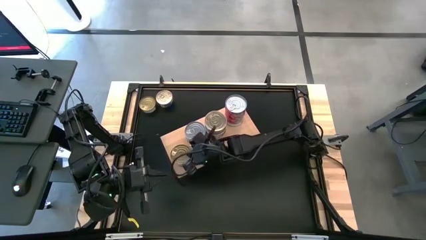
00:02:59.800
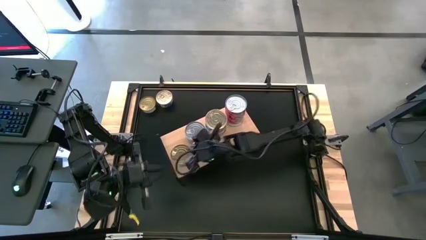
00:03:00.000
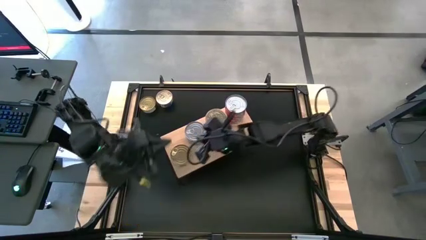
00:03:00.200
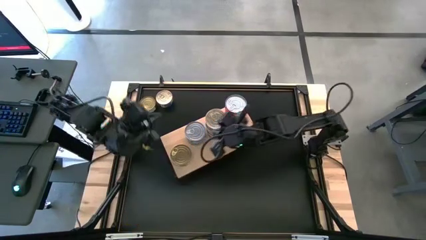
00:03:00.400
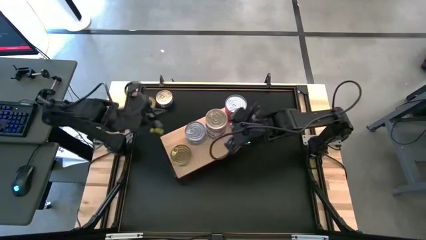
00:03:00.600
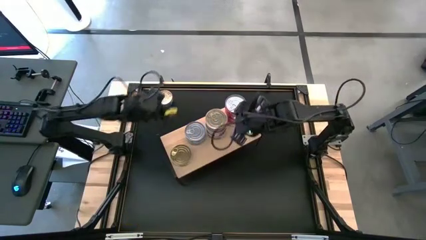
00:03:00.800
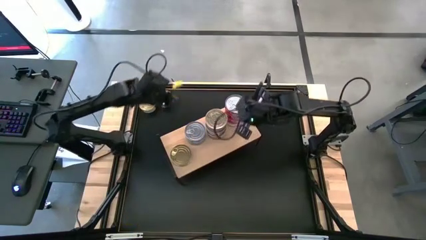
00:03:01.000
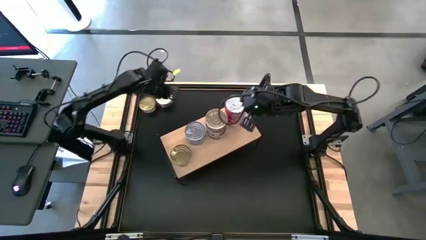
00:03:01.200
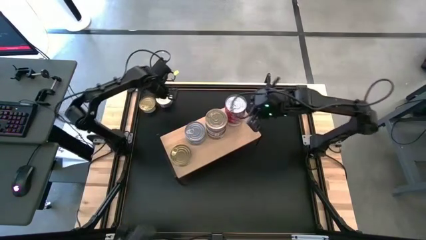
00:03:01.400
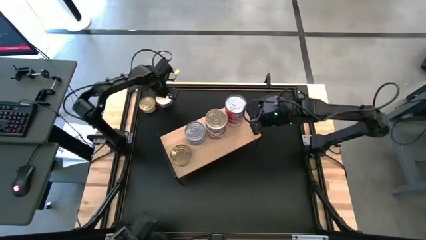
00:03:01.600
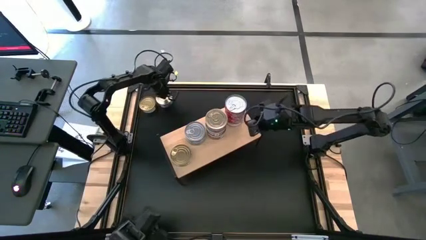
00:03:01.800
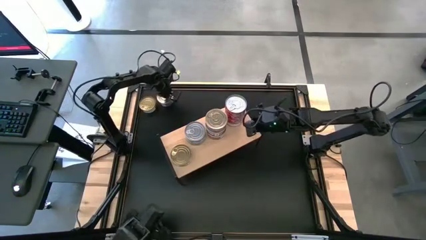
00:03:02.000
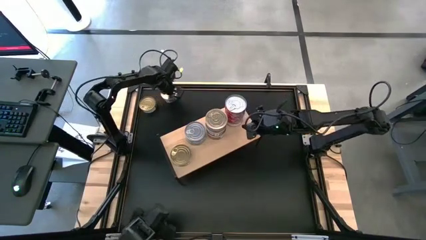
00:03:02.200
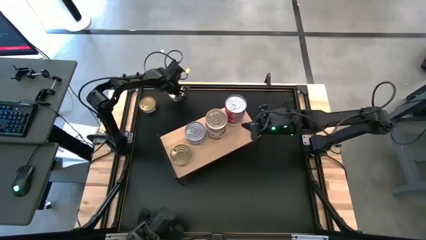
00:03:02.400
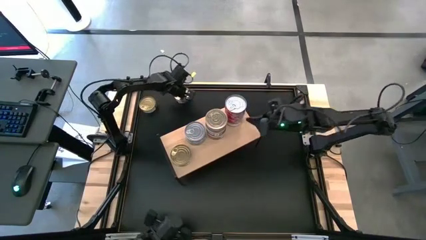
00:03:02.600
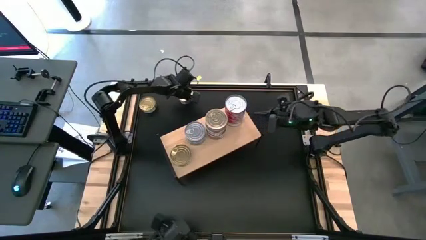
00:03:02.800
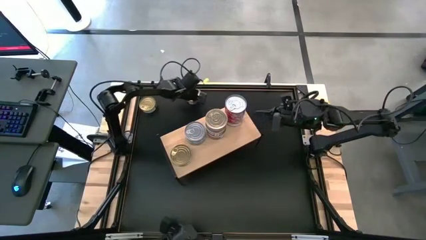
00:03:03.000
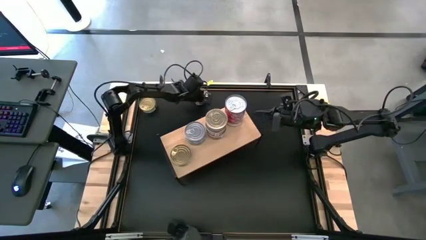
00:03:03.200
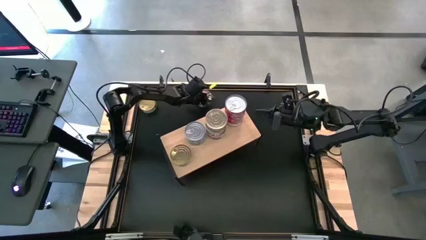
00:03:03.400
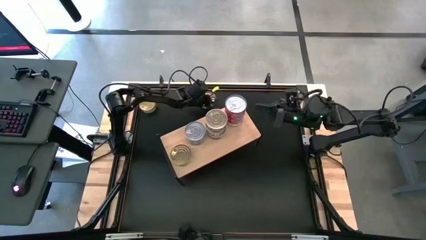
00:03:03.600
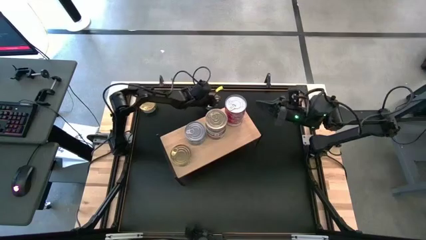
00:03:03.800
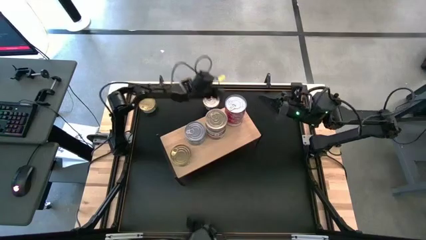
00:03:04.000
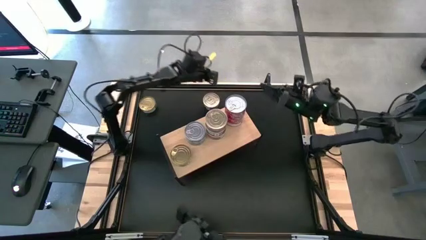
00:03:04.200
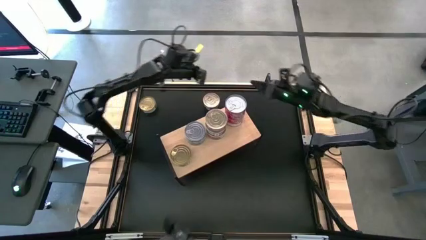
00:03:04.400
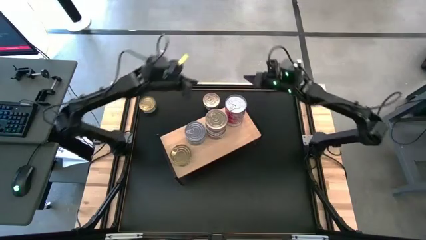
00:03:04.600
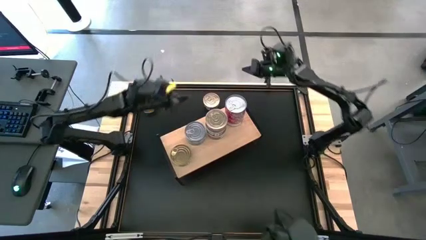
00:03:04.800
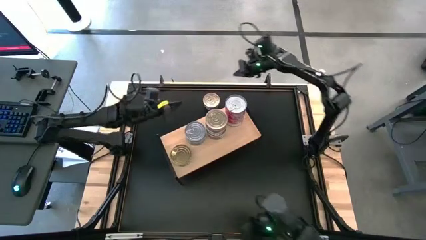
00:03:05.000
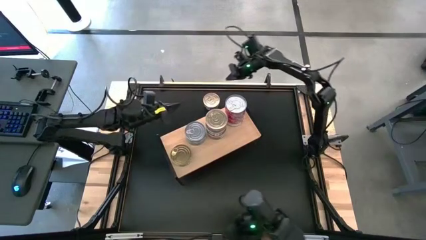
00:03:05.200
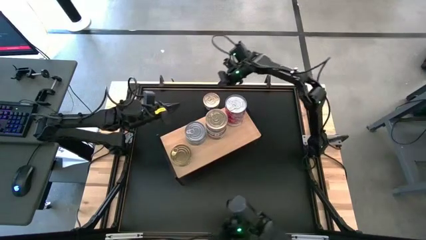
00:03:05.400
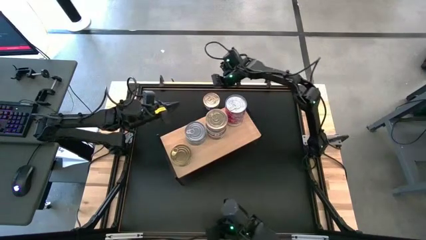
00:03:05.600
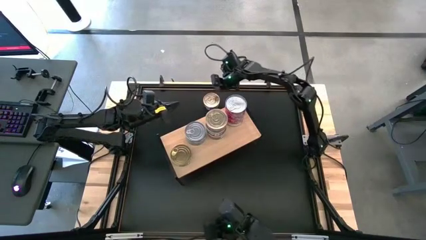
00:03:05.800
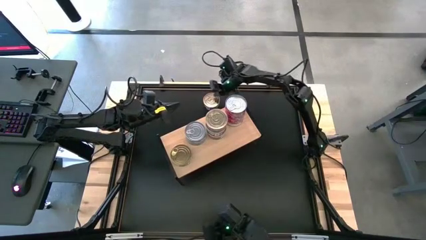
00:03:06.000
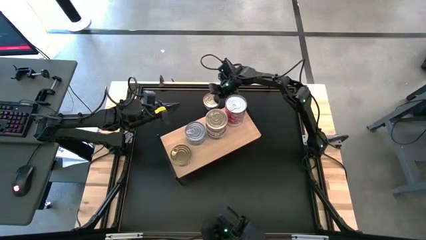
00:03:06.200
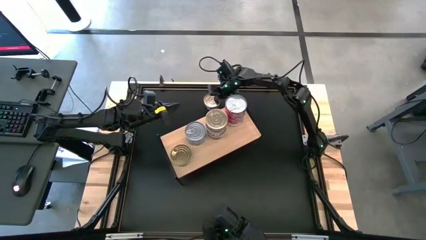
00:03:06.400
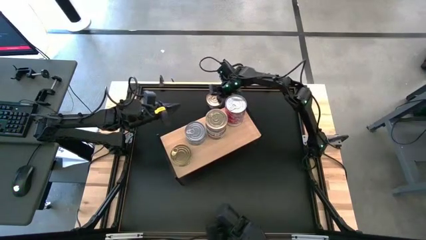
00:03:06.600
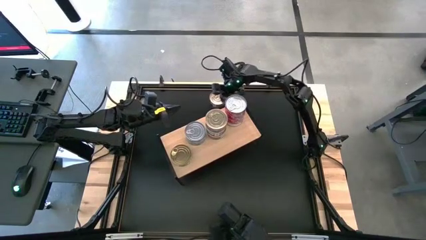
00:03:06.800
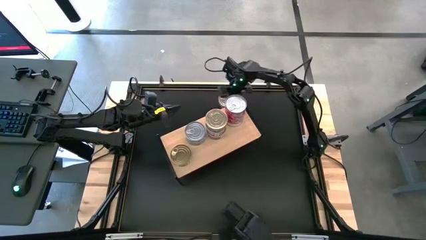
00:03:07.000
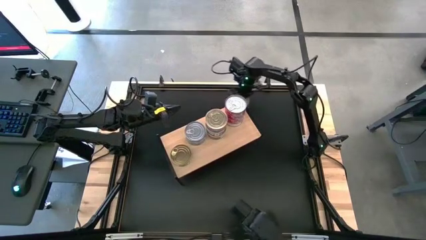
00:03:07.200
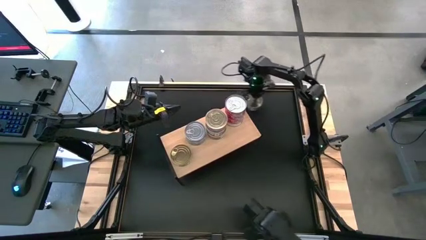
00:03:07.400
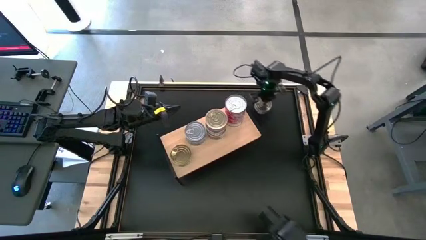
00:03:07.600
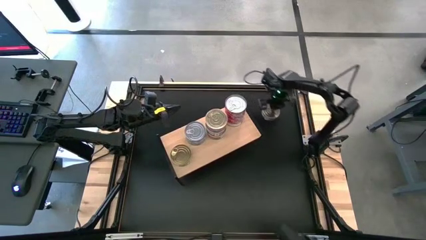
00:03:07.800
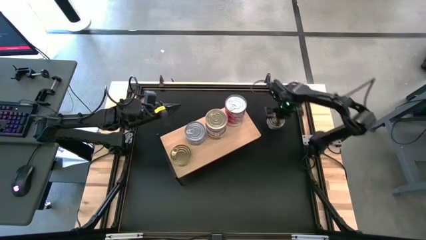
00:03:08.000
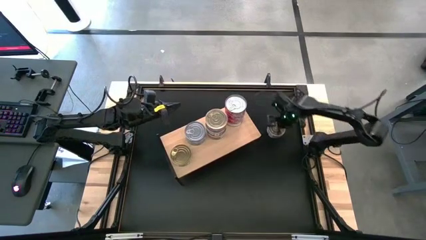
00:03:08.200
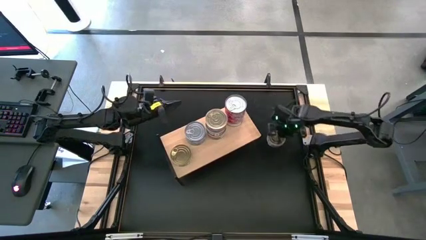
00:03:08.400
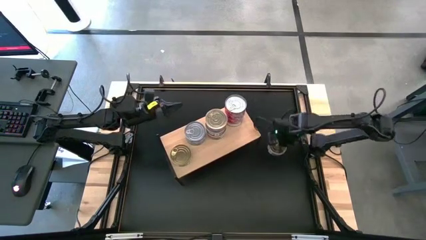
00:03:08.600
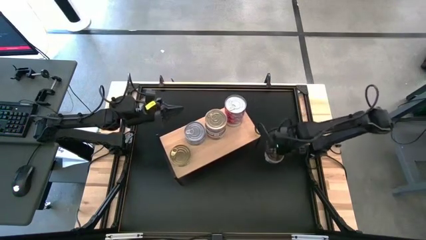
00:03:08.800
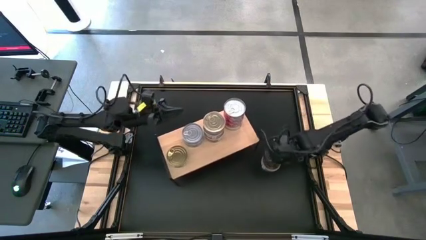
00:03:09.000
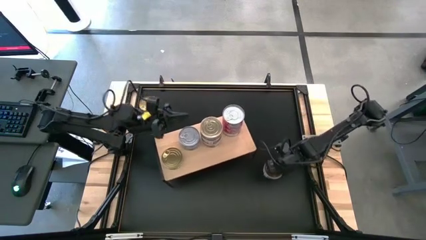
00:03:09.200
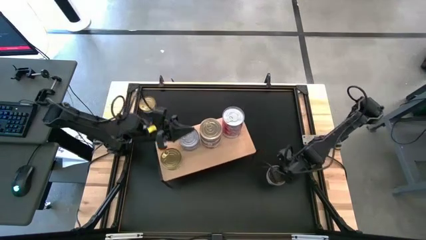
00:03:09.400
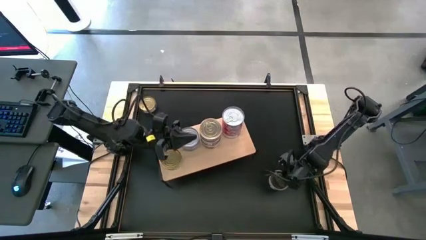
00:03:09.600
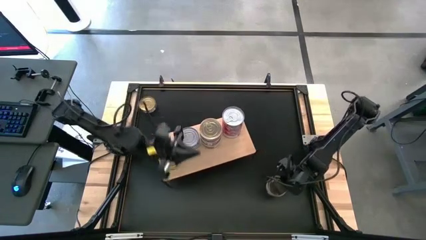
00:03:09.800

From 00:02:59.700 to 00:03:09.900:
Task: Stack canned seafood by type on shelf
Stack the blue tuna can on the top of the other blue tuna can on the shelf

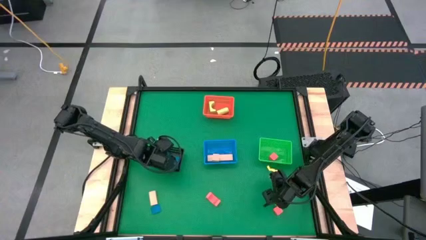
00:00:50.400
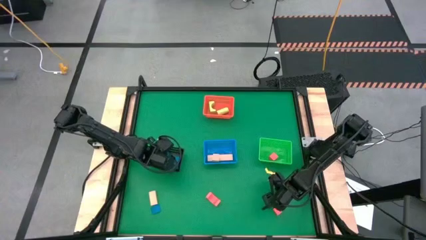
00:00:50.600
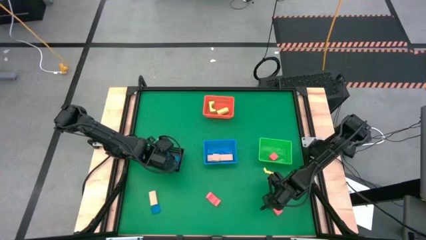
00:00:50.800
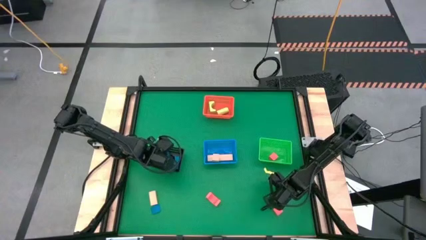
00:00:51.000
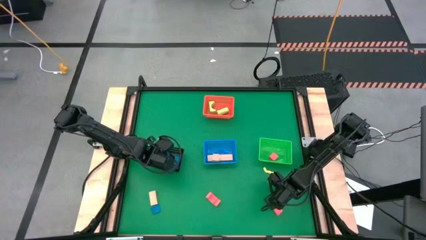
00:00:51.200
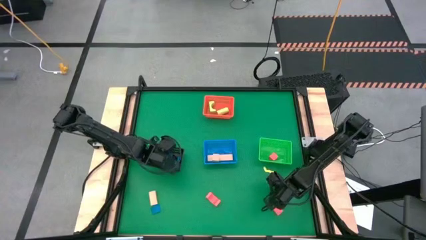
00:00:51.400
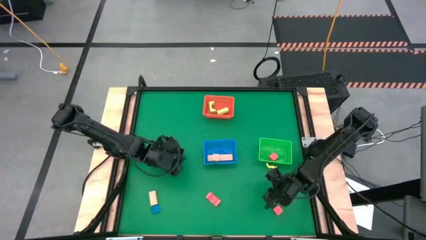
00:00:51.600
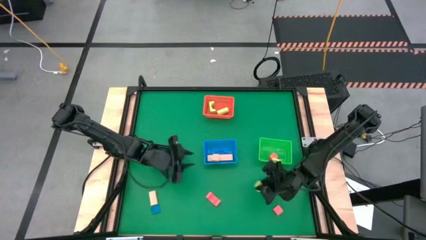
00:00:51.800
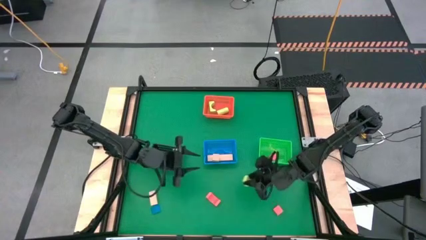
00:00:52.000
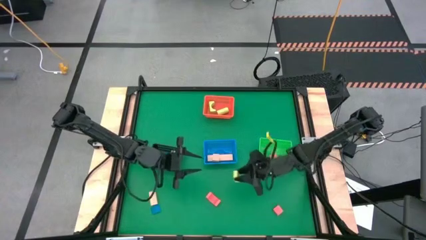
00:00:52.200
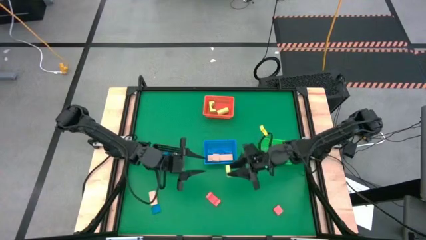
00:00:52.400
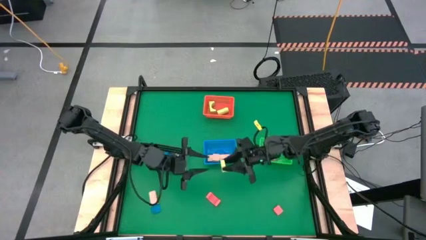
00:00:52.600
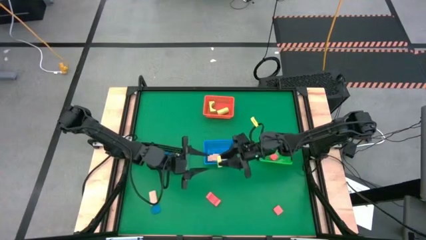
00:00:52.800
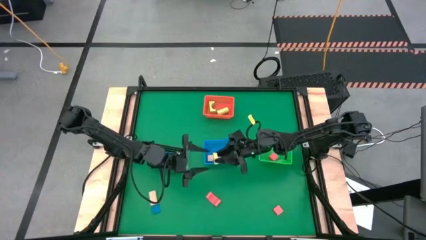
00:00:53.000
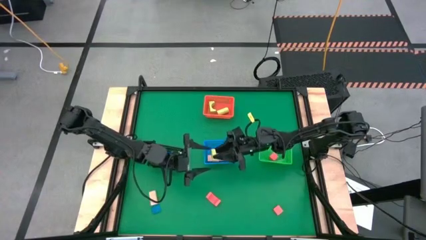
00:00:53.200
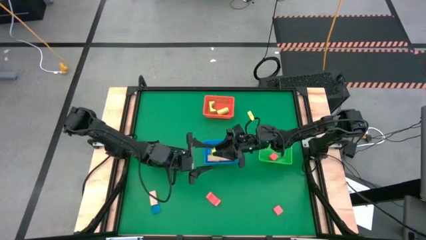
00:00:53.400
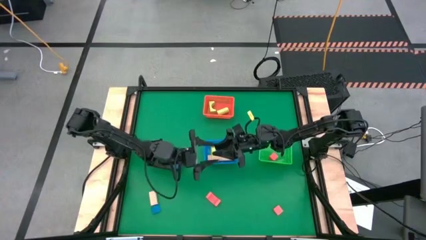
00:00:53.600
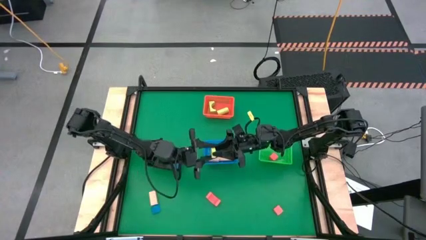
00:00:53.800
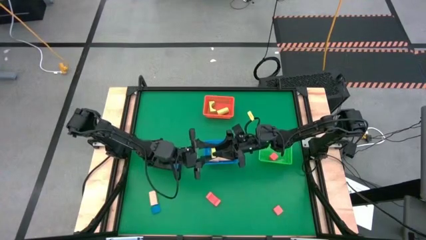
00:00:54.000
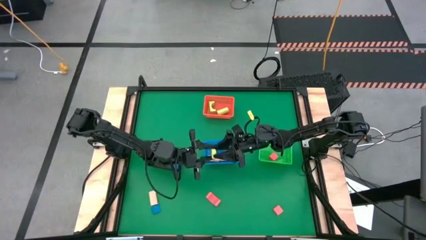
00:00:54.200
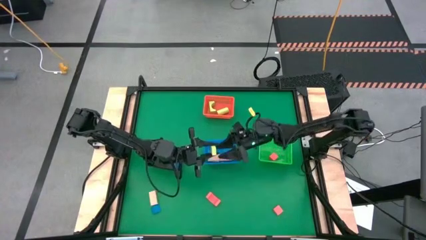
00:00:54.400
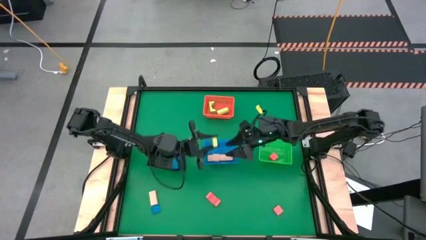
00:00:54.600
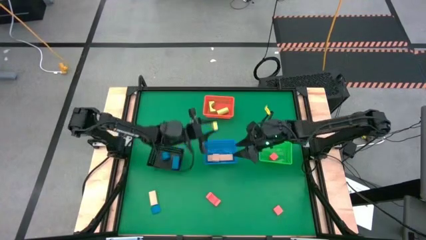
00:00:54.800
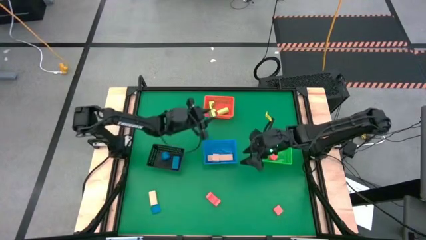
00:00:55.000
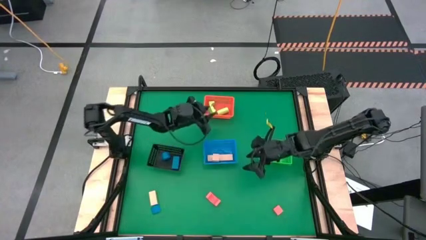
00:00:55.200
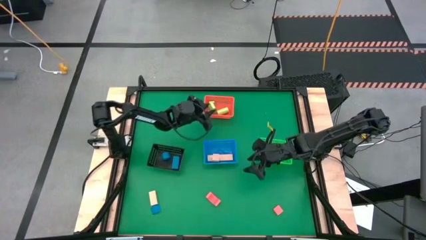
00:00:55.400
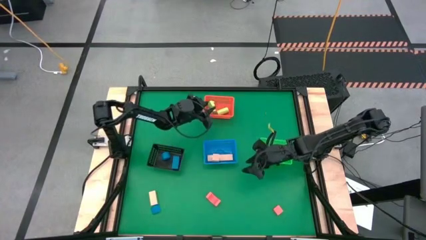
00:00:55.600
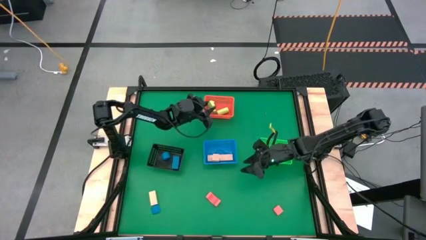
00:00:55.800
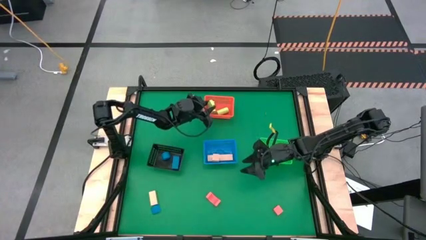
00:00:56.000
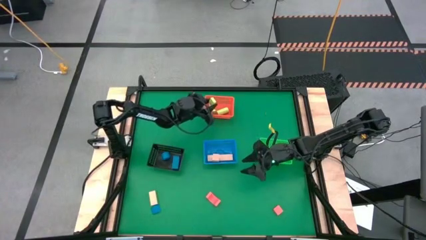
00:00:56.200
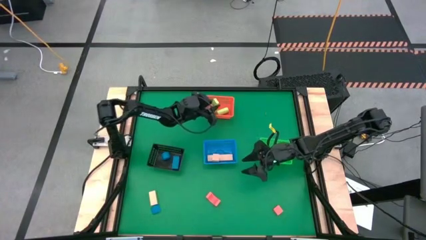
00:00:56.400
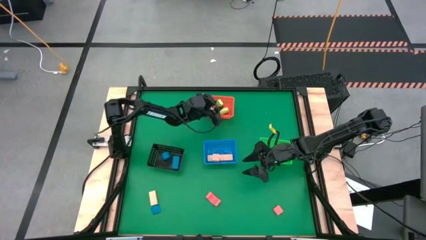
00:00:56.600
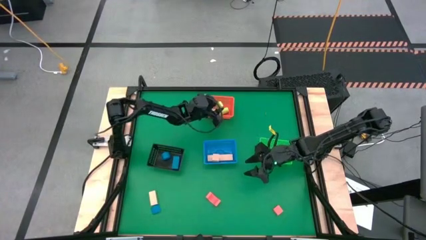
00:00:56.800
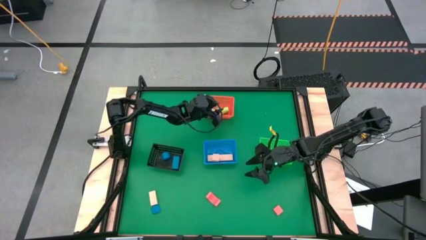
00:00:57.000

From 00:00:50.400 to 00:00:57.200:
Task: Sort & place blocks by color
Put the green block into the red bin
